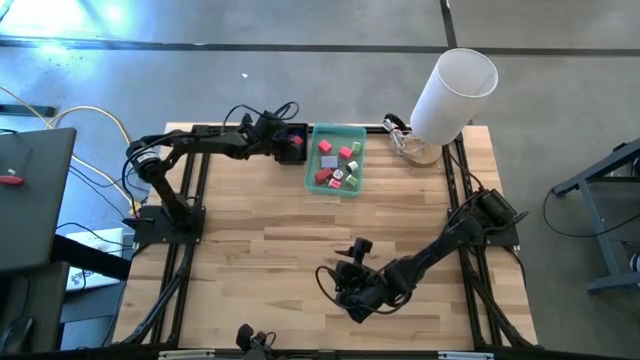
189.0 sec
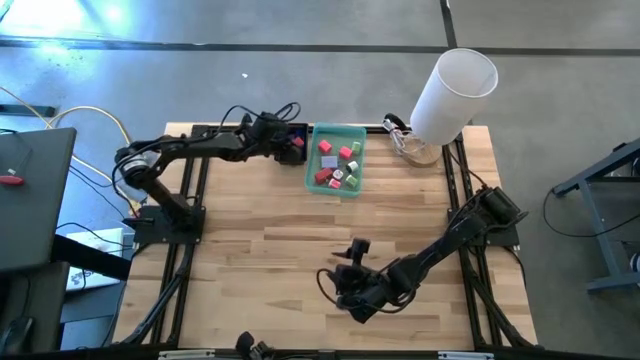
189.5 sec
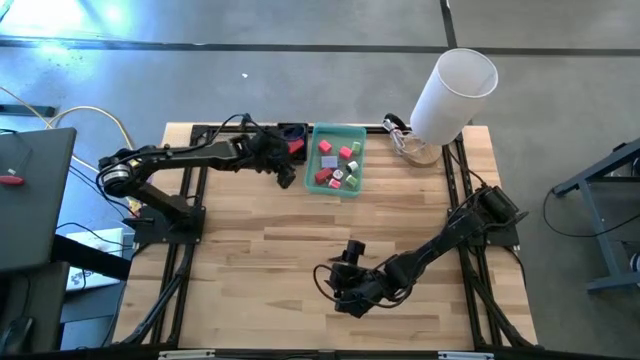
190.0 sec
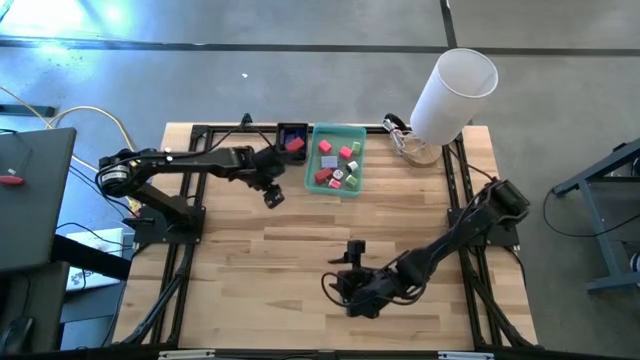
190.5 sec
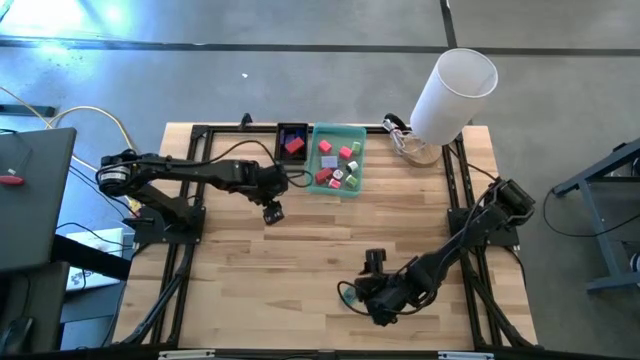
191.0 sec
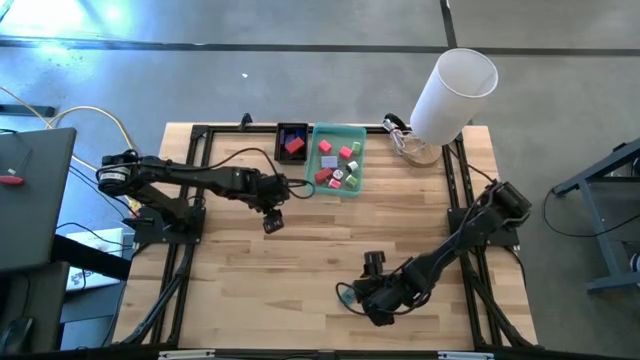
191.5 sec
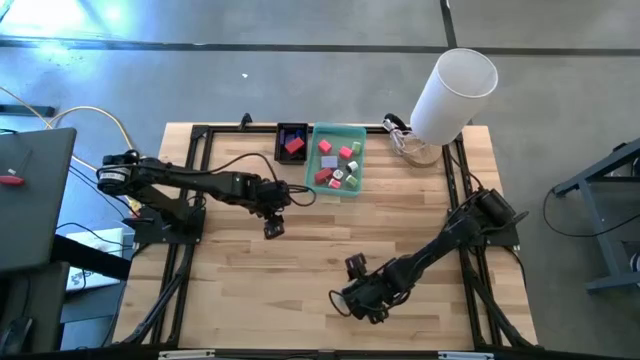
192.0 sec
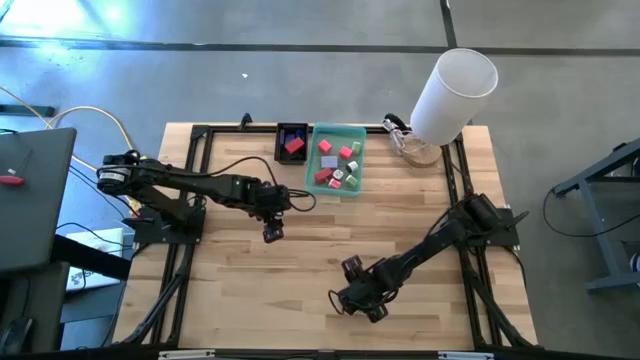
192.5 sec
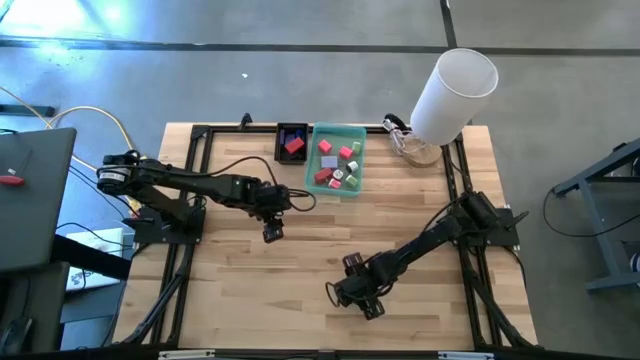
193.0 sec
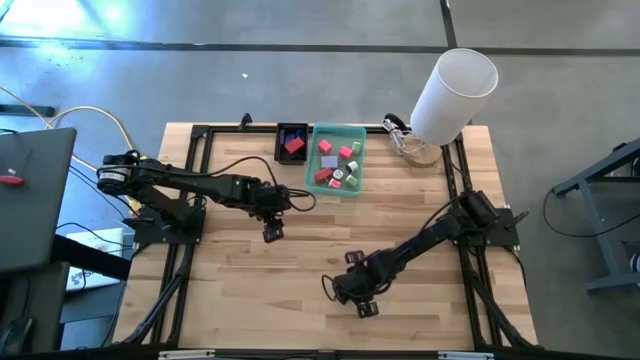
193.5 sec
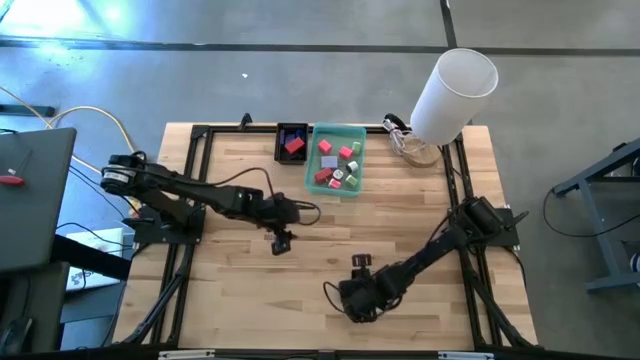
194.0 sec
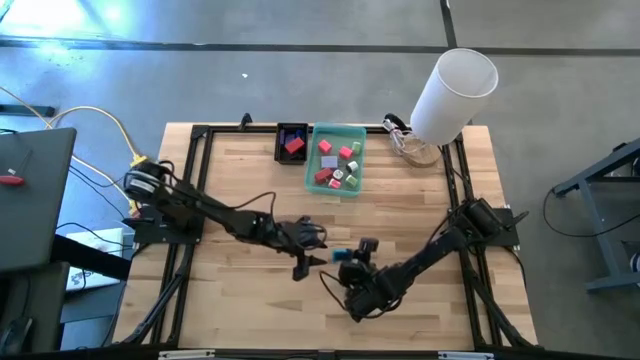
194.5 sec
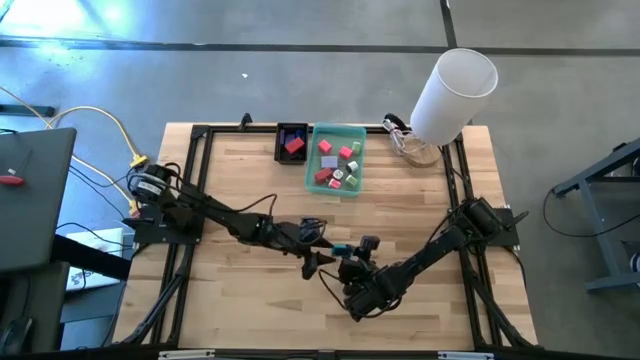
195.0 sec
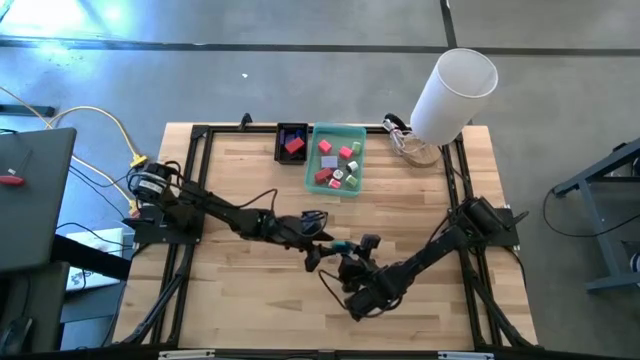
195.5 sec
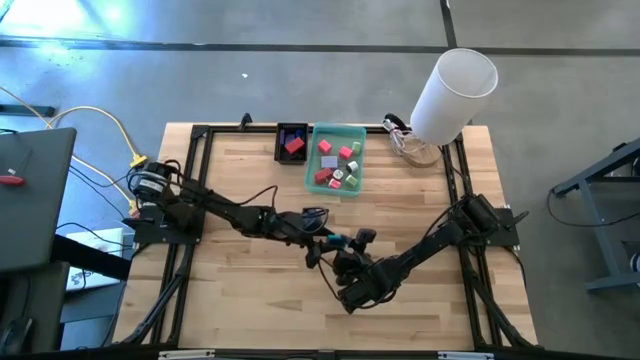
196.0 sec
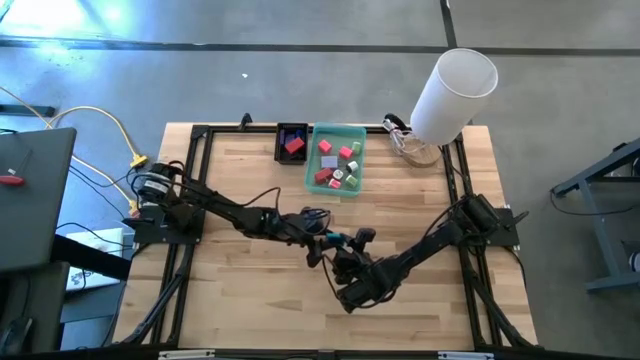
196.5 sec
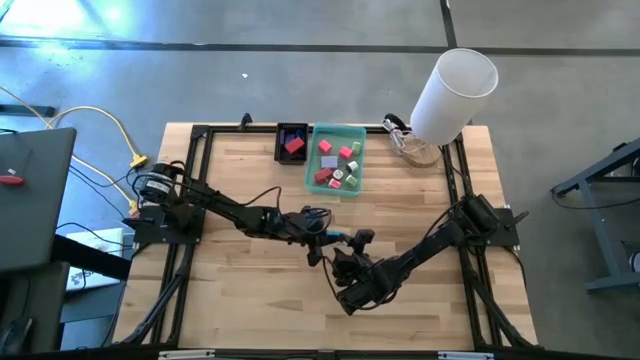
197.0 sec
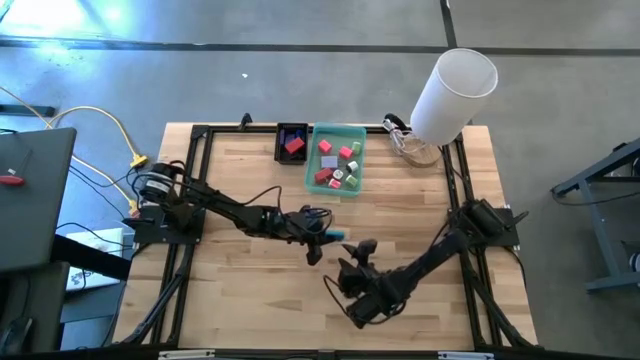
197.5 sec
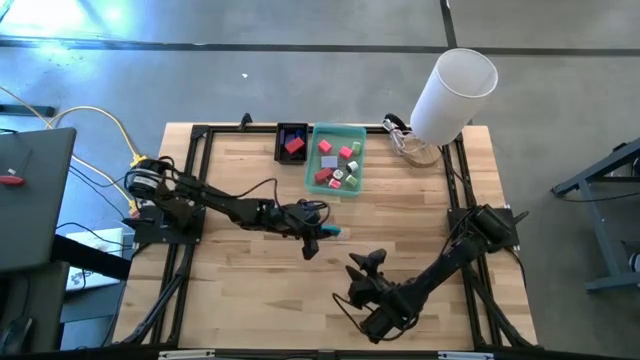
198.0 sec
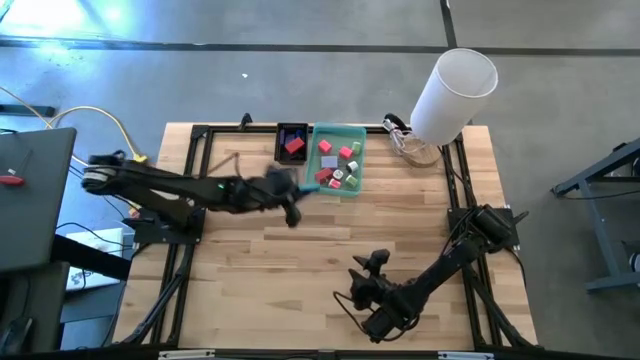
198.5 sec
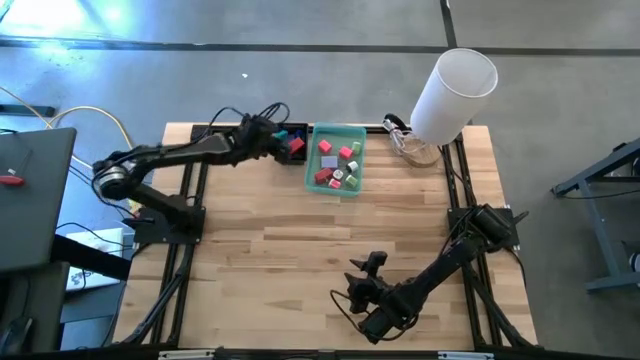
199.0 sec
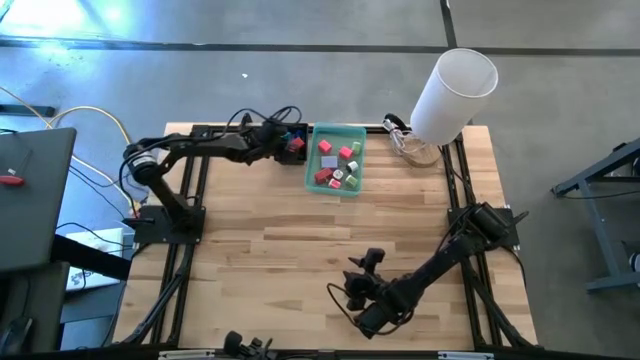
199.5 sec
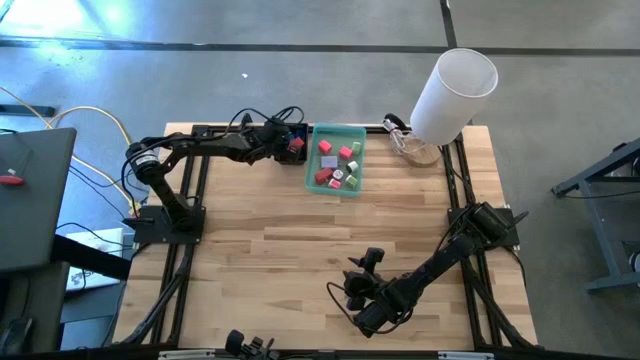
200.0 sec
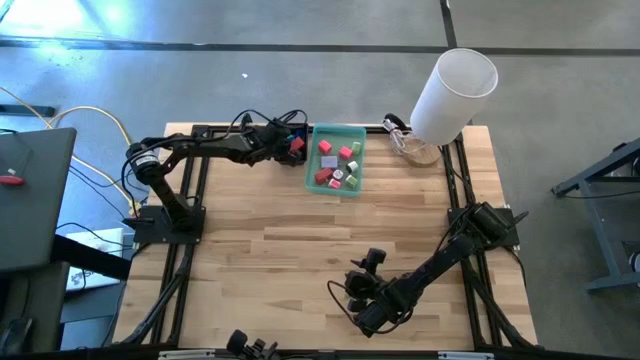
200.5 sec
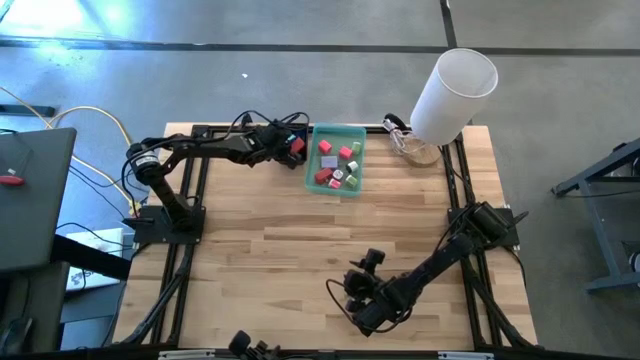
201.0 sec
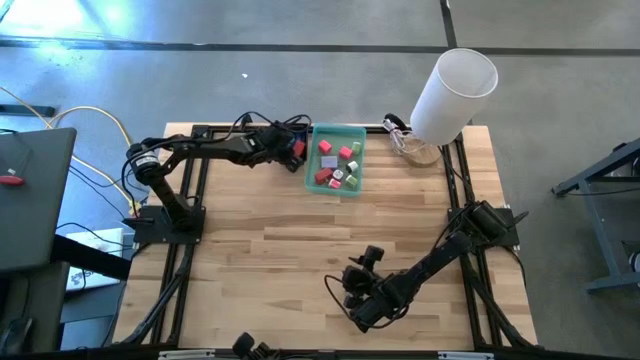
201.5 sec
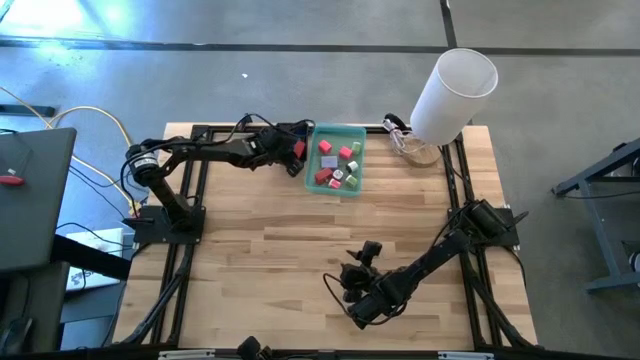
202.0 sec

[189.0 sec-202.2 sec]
Task: Pick & Place Office items
Put the light blue digital clock into the black bin

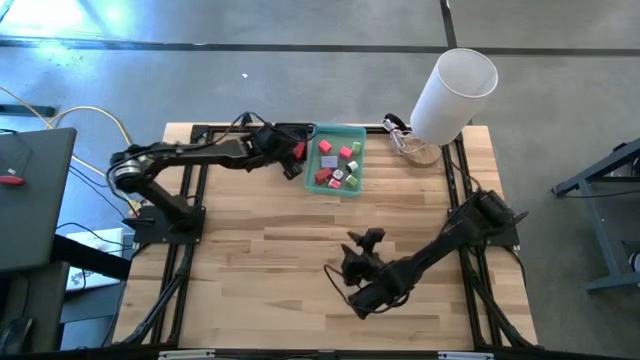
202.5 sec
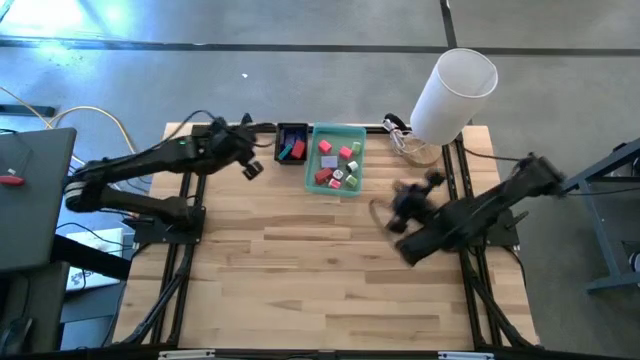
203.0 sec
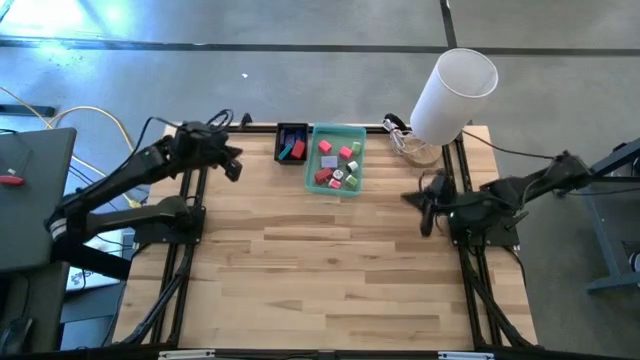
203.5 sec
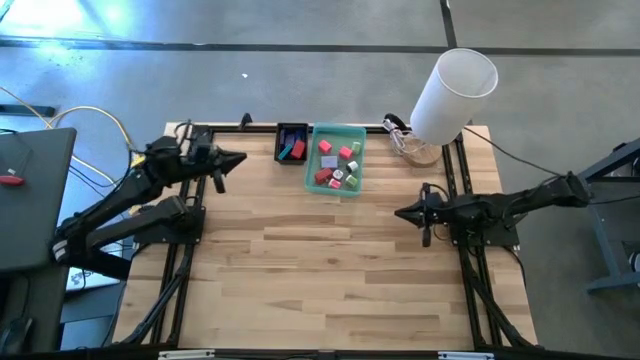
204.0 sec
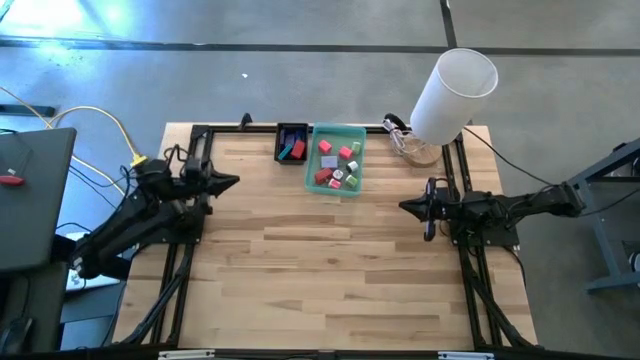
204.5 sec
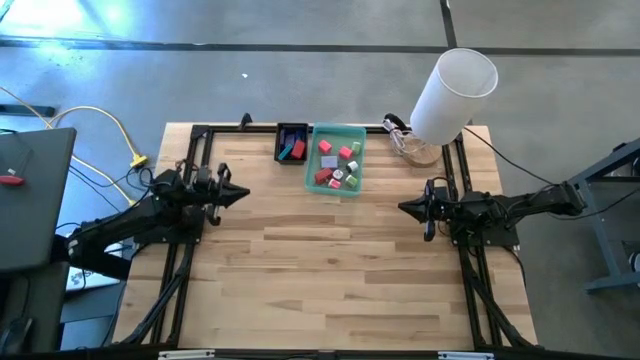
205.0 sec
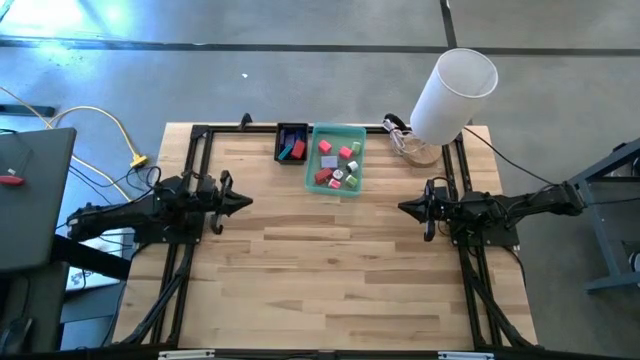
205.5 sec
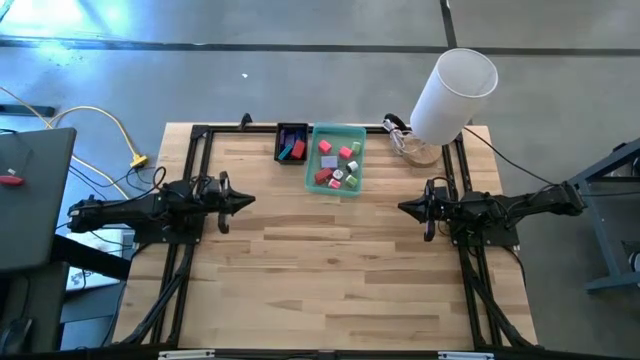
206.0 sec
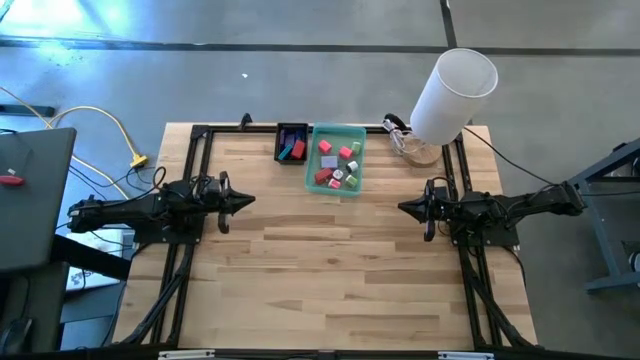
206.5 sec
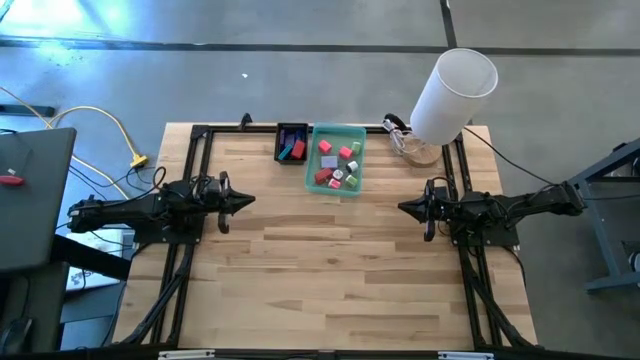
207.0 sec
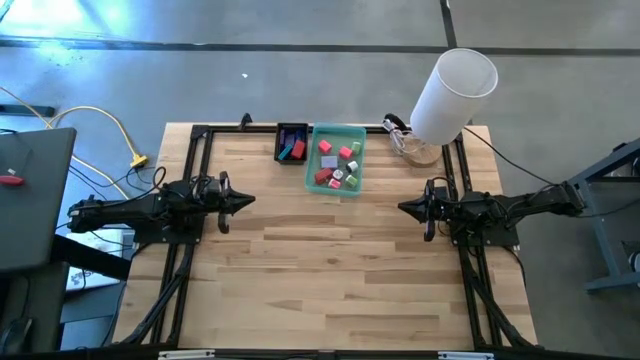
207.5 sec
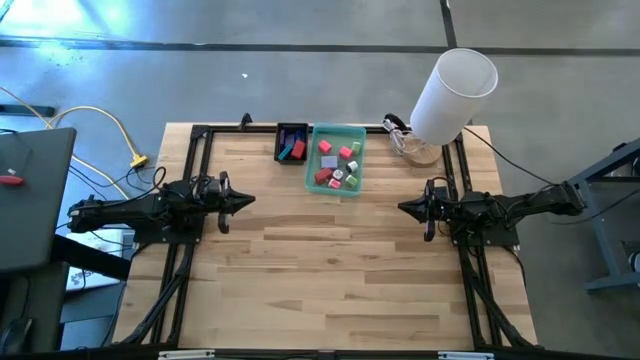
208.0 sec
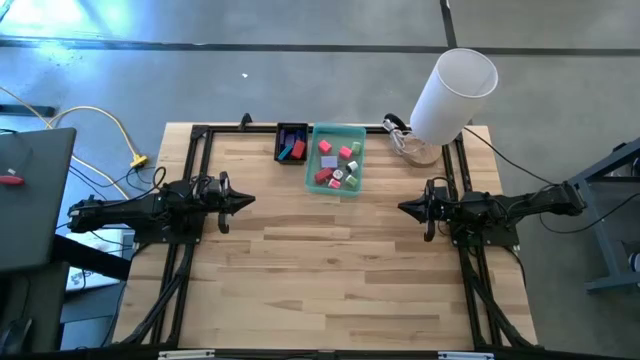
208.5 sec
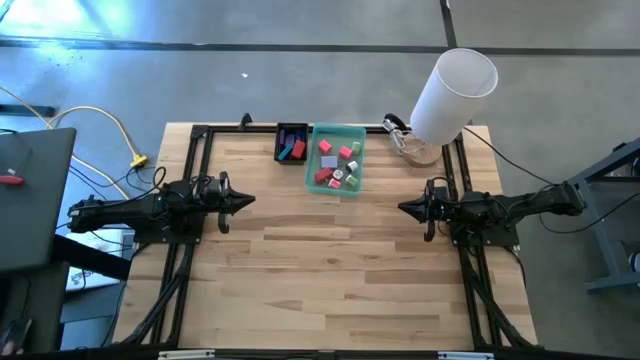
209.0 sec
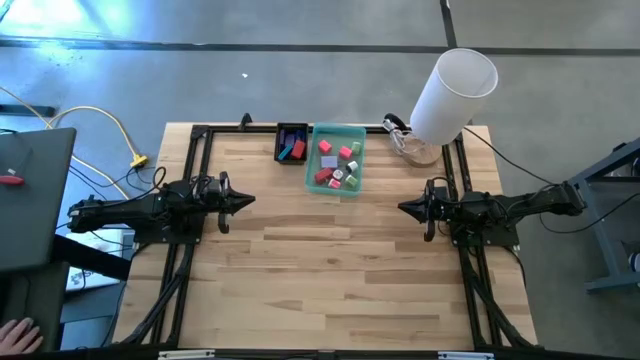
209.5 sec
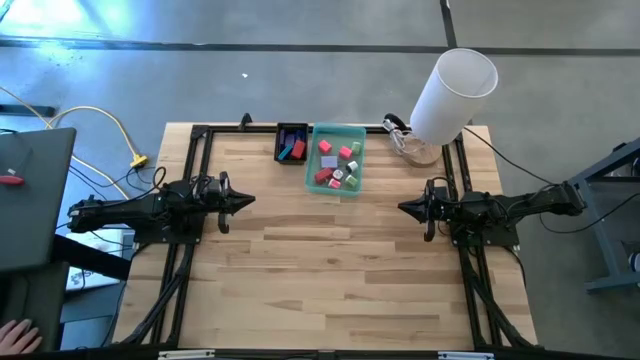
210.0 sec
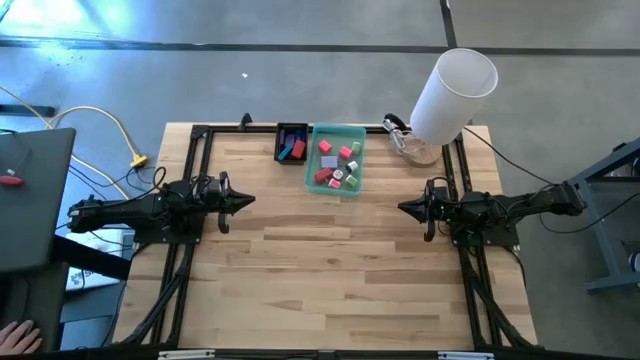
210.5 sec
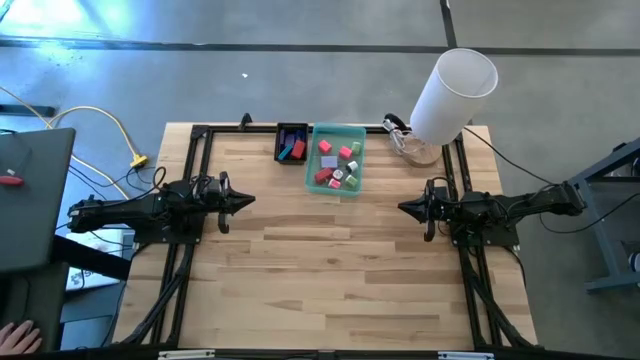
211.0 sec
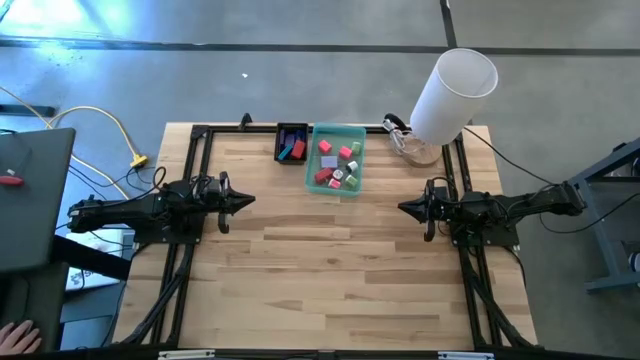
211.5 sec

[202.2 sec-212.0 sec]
Return to Home Position
